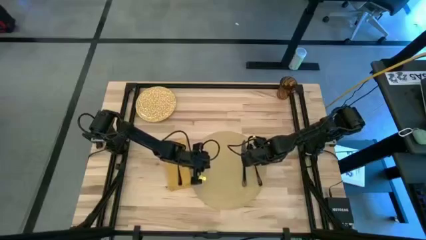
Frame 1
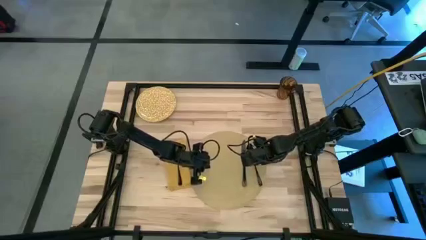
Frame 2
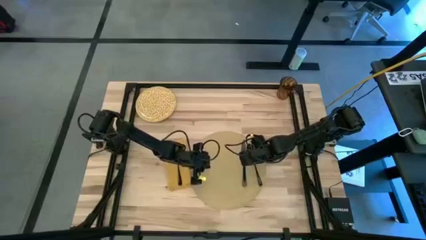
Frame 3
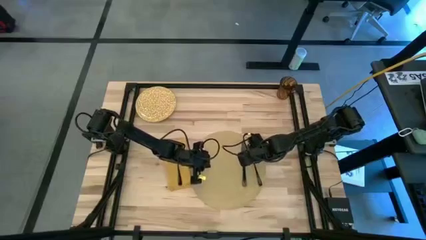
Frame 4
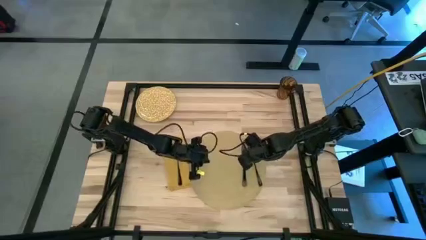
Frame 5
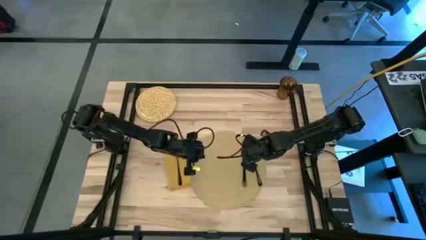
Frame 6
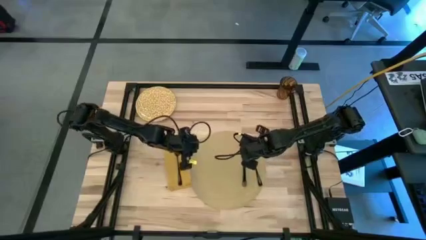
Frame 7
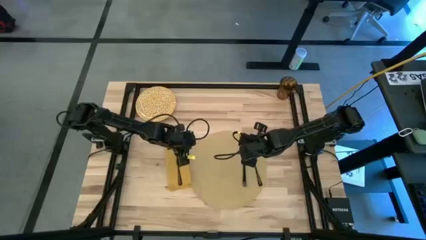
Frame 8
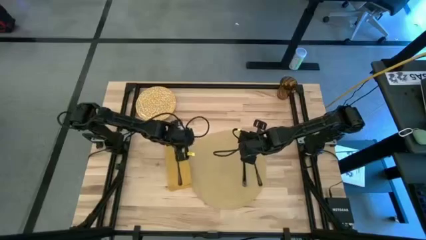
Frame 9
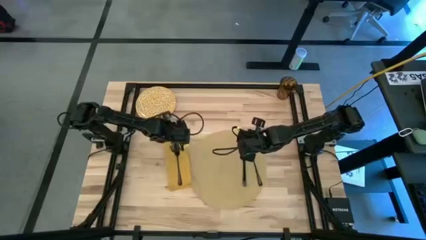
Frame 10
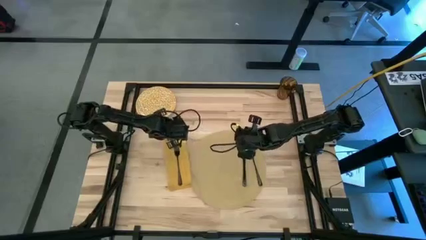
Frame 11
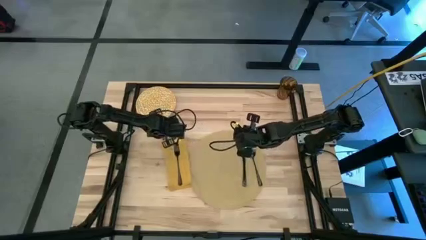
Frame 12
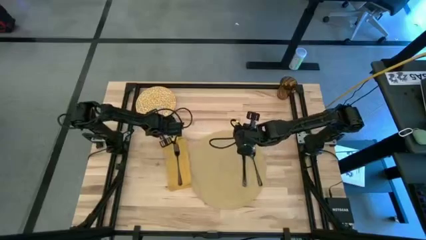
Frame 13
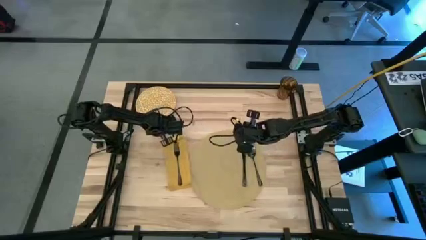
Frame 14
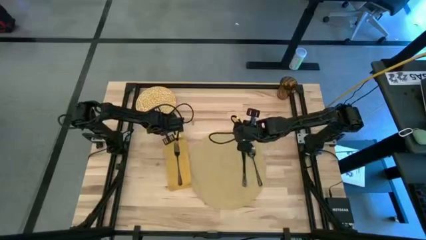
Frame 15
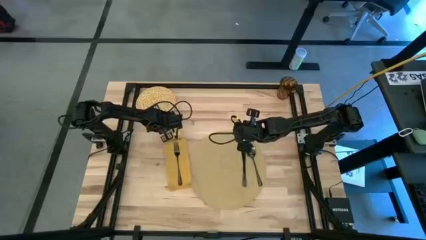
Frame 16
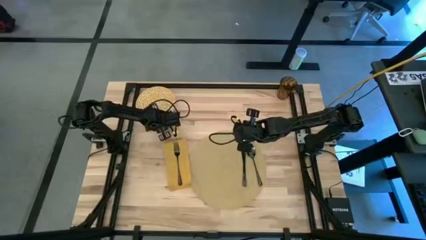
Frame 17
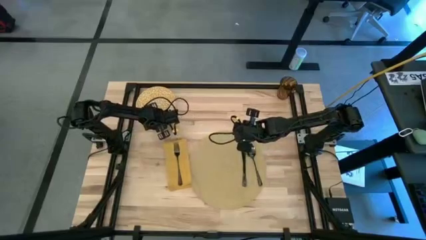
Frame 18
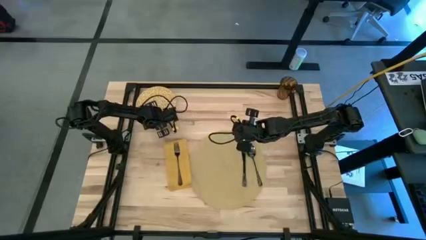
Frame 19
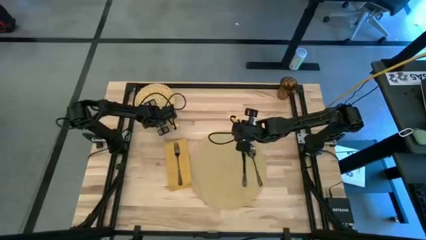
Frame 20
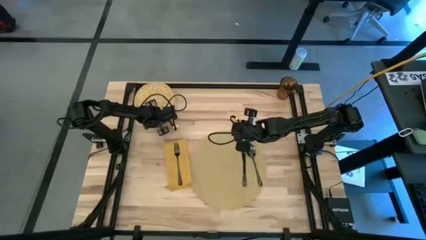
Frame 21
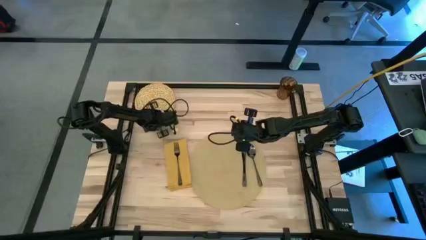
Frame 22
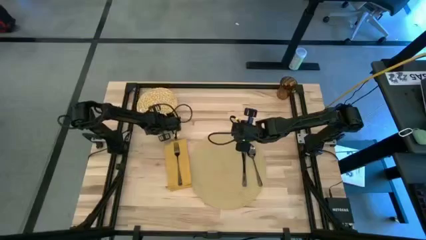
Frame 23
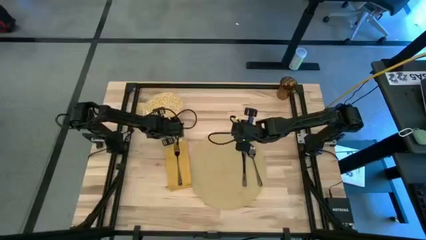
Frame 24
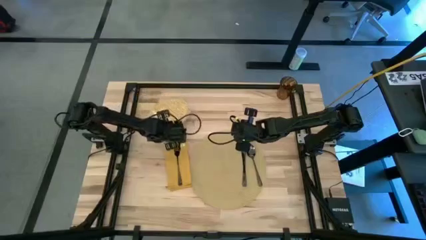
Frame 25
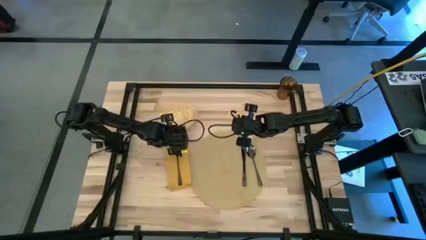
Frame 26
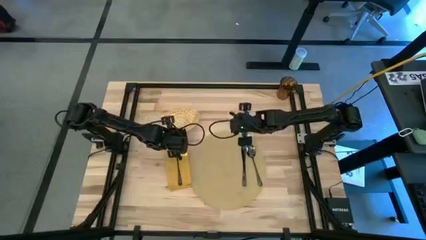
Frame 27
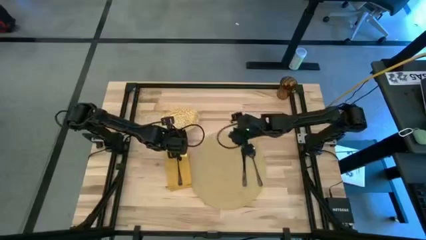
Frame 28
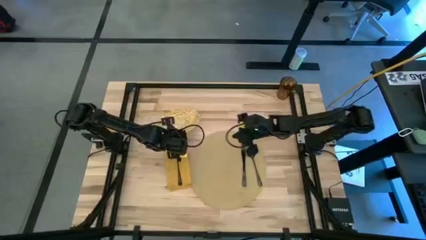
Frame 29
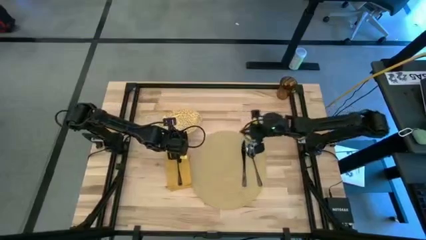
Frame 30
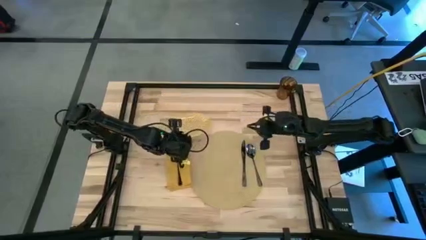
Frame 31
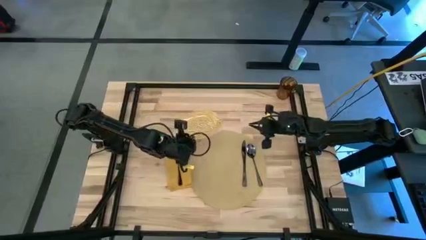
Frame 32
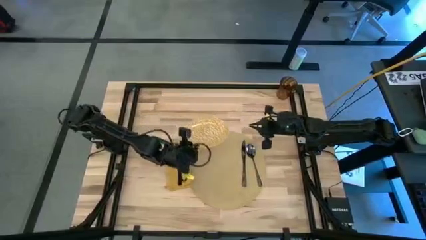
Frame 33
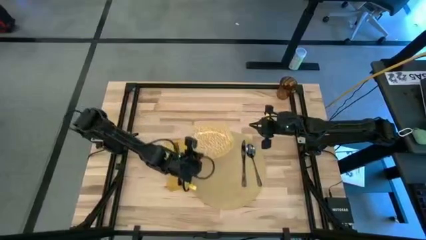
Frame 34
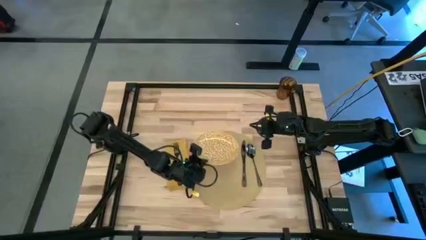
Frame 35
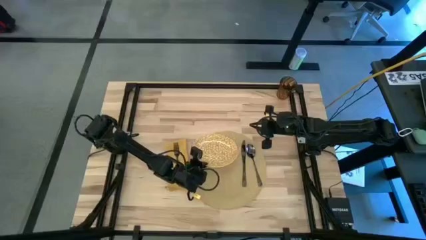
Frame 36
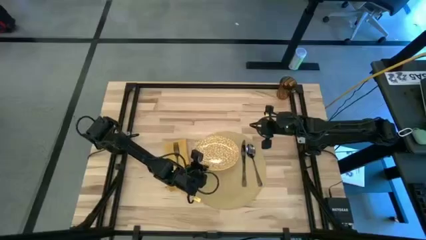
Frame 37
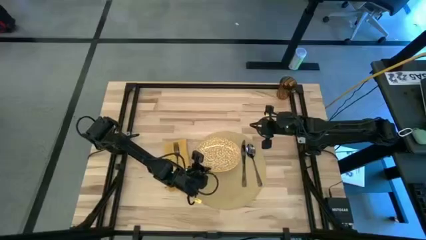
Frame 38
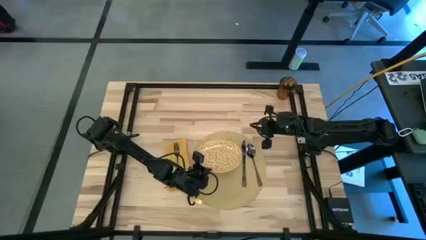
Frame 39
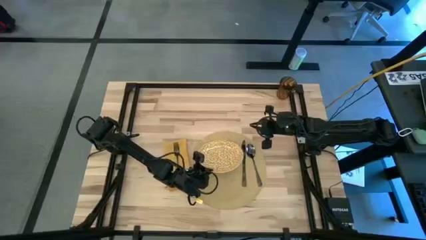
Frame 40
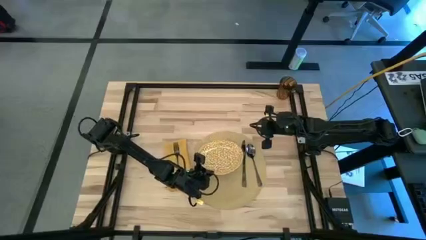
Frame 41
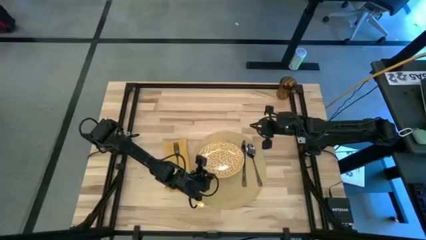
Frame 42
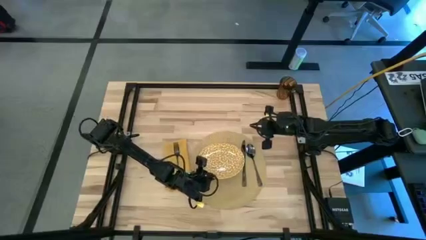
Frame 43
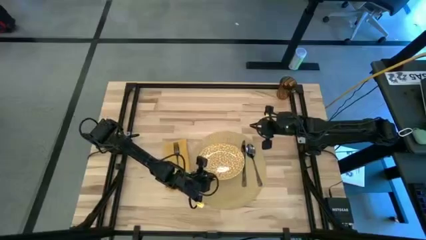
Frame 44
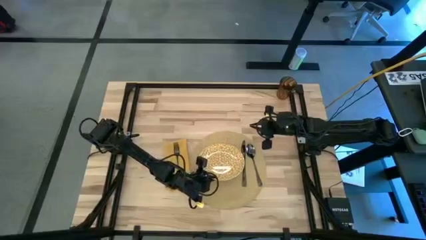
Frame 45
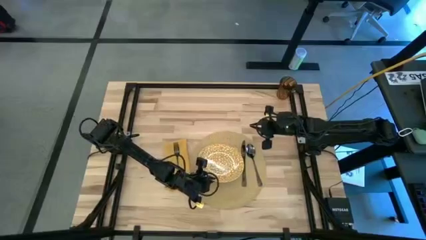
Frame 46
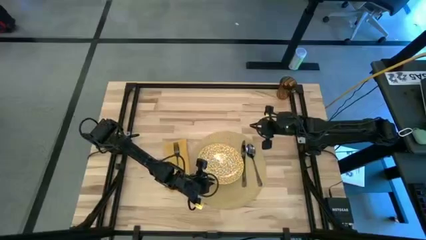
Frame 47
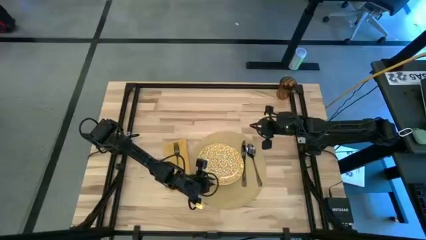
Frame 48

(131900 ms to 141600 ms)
Task: Set table place
Put the yellow patterned plate on the yellow placemat to the left of the black table knife

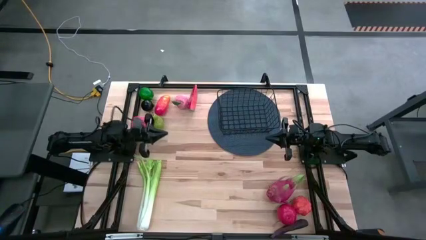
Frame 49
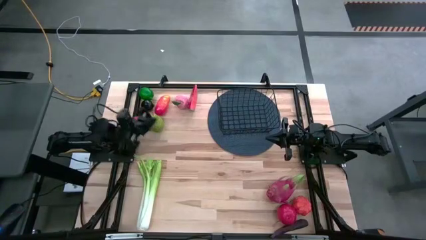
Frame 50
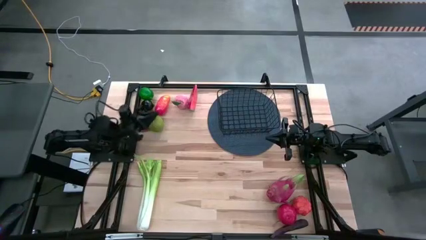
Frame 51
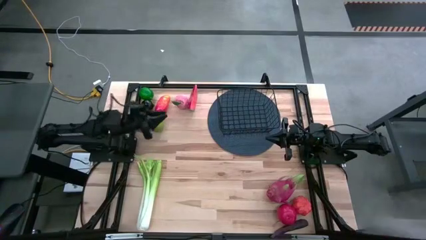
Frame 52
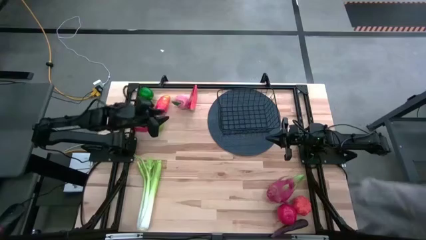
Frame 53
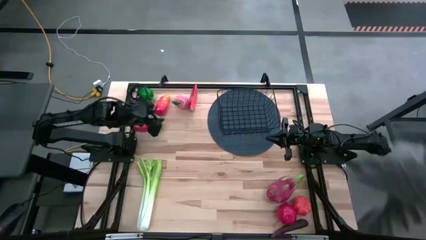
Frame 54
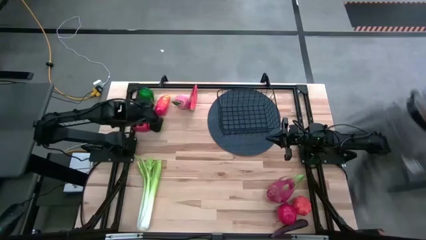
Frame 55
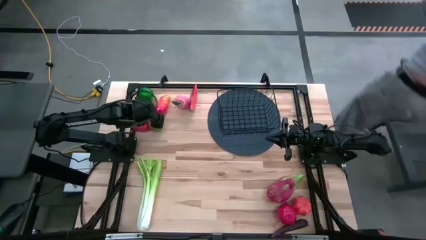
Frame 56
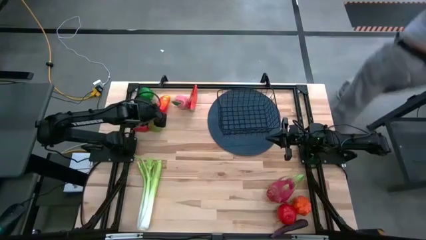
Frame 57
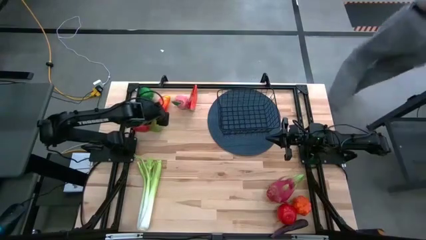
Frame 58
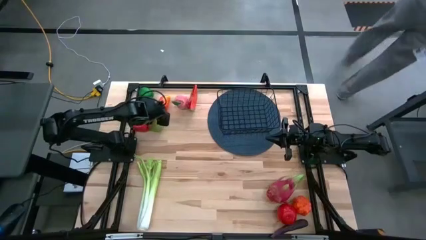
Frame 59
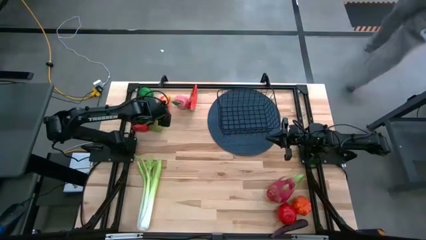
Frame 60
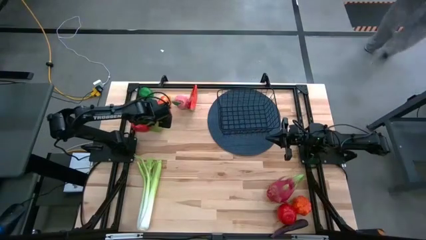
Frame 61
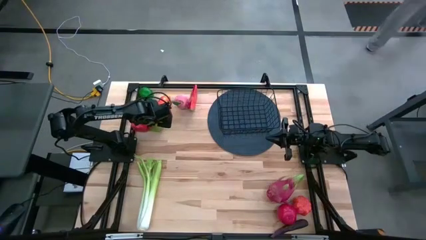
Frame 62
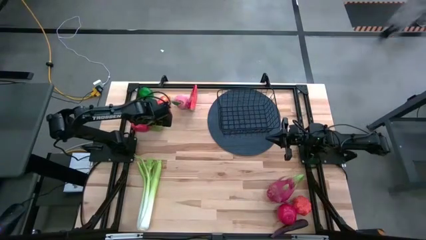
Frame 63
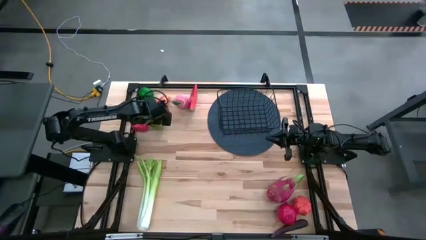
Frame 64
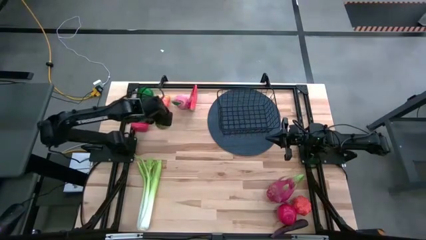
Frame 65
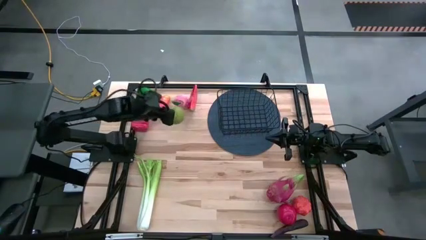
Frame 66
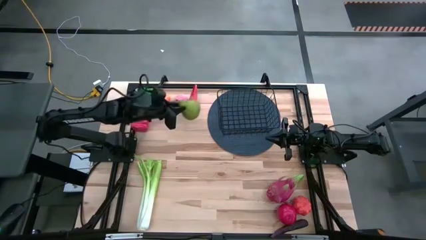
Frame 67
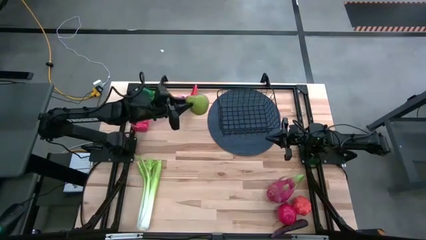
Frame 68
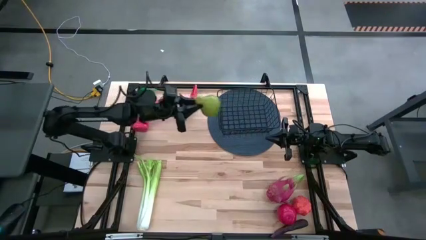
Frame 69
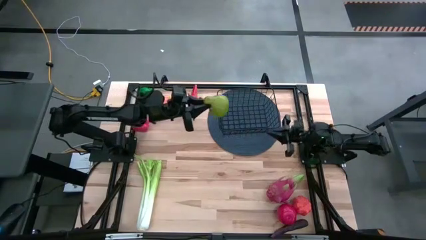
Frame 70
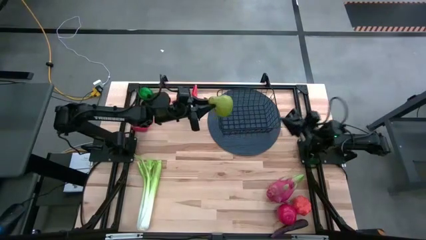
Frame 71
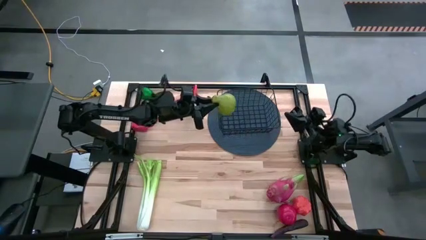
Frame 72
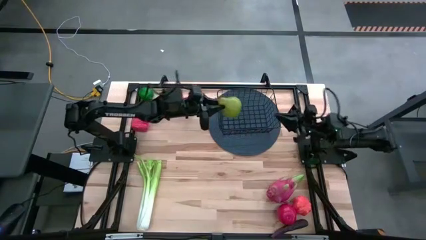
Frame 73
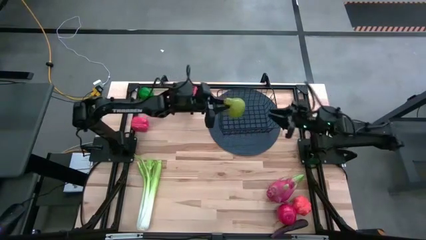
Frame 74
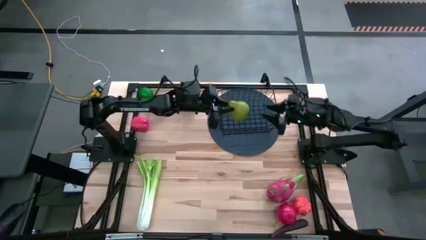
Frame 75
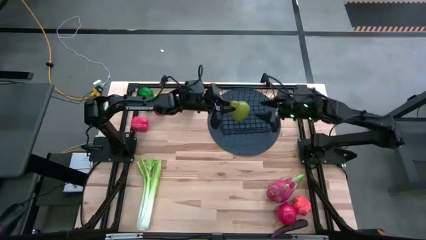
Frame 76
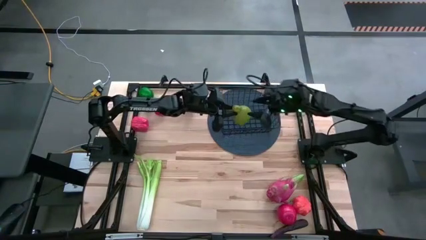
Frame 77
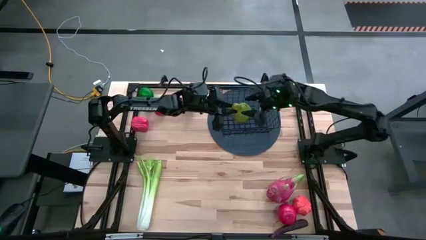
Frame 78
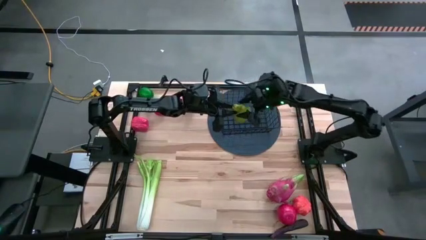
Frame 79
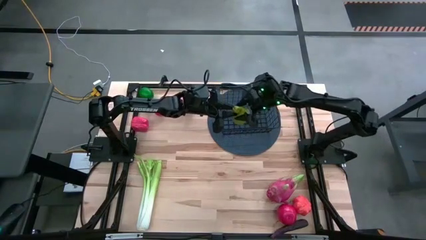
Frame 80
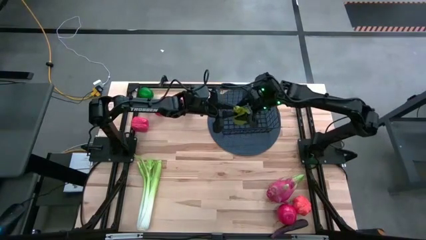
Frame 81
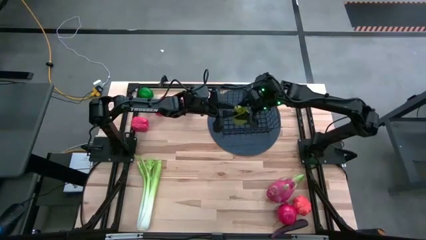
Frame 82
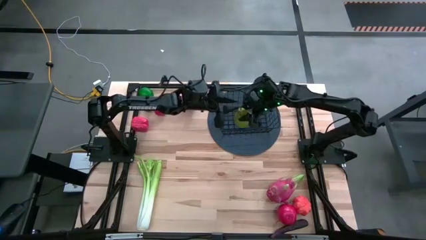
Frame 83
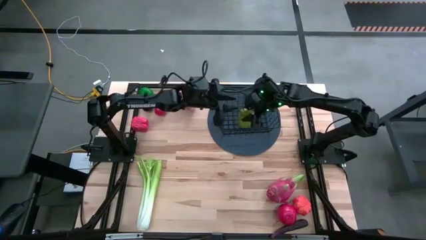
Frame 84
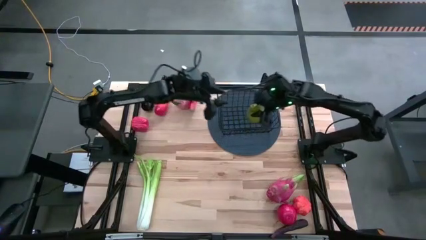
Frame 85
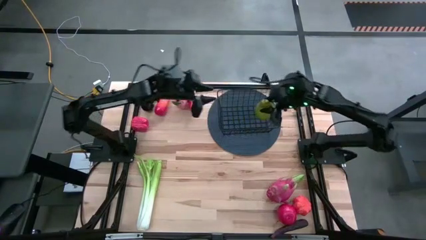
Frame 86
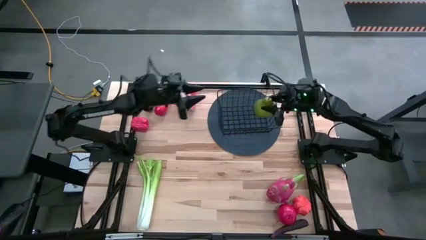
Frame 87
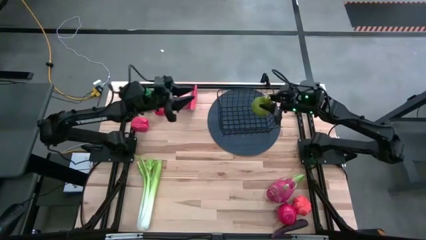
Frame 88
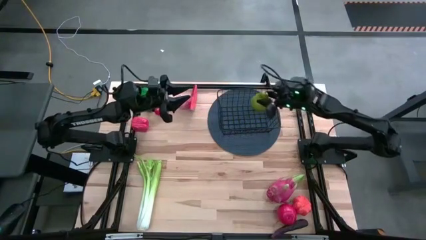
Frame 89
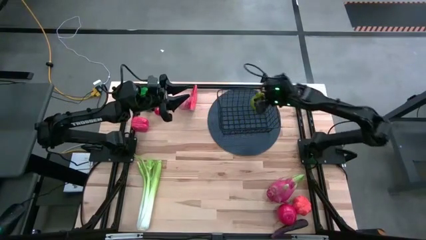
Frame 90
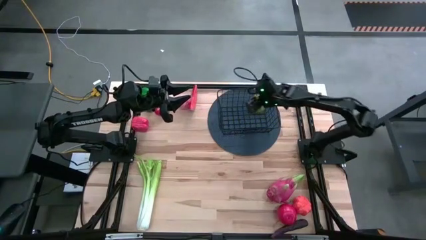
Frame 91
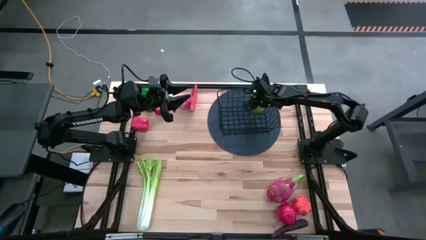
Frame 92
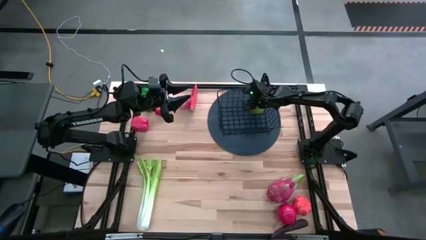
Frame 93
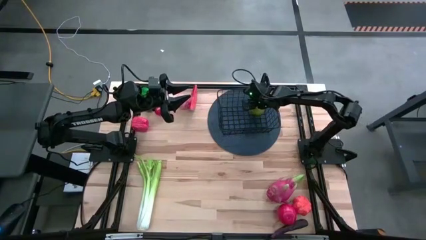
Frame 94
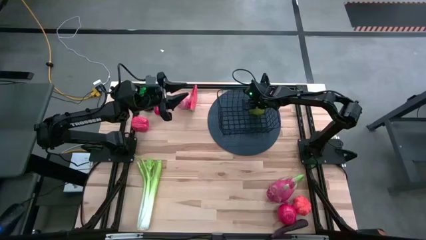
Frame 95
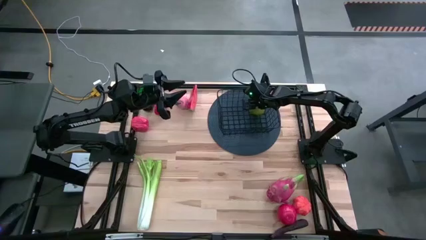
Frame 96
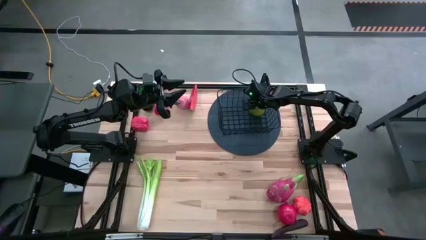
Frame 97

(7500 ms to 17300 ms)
Task: Build produce basket
Put the pear into the black wire basket
